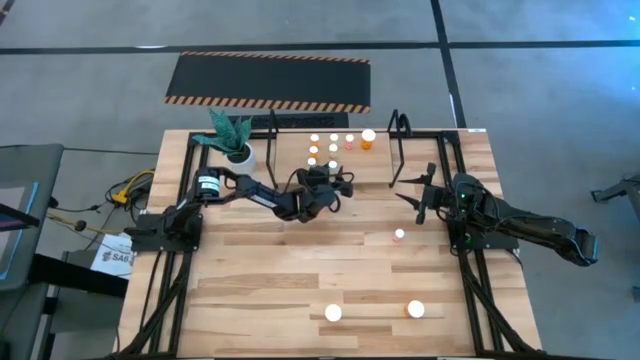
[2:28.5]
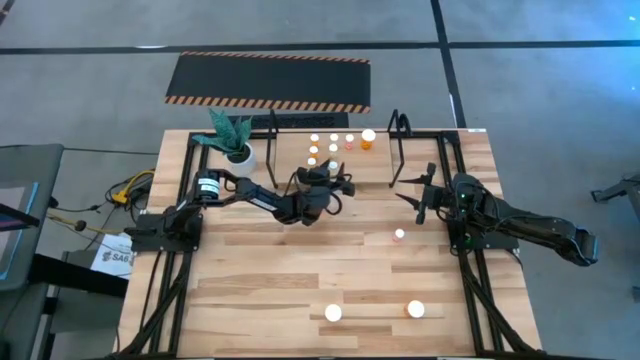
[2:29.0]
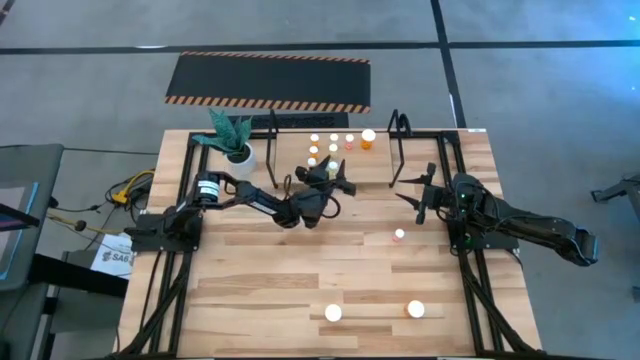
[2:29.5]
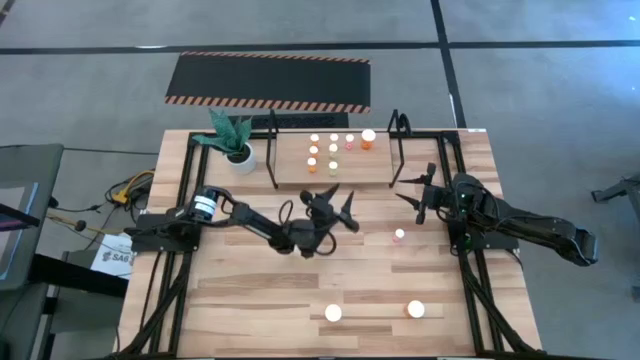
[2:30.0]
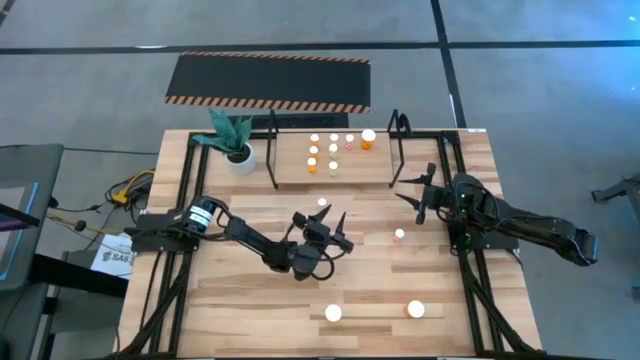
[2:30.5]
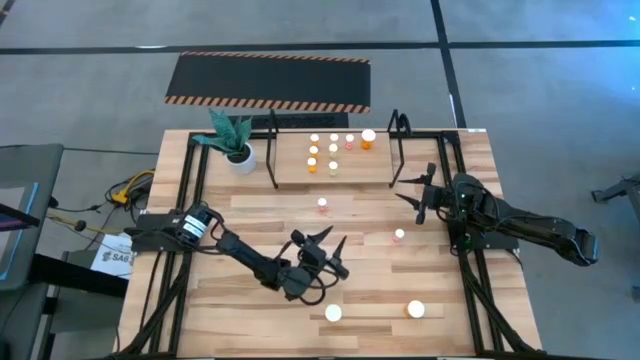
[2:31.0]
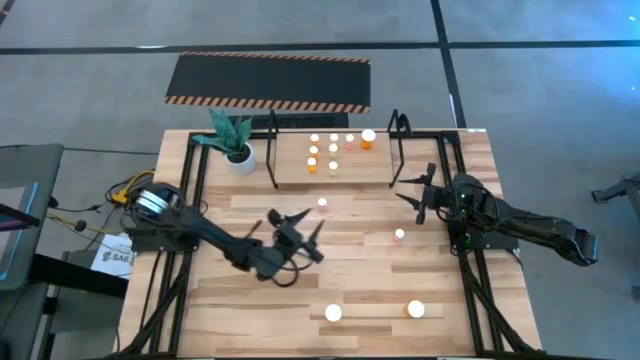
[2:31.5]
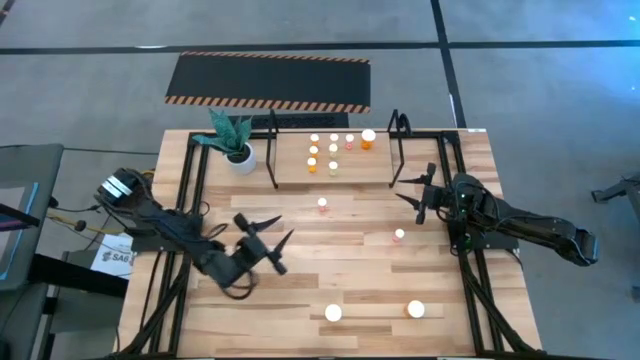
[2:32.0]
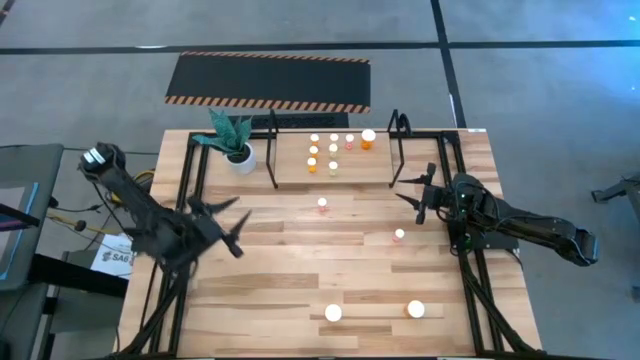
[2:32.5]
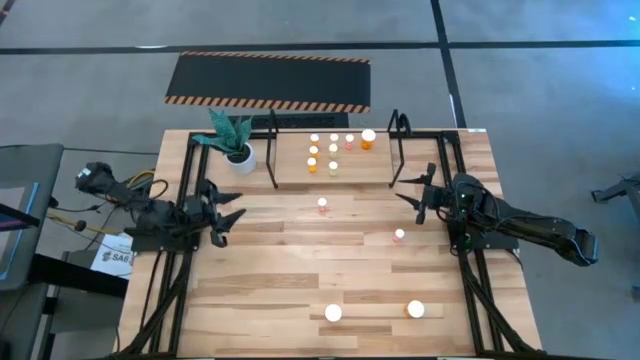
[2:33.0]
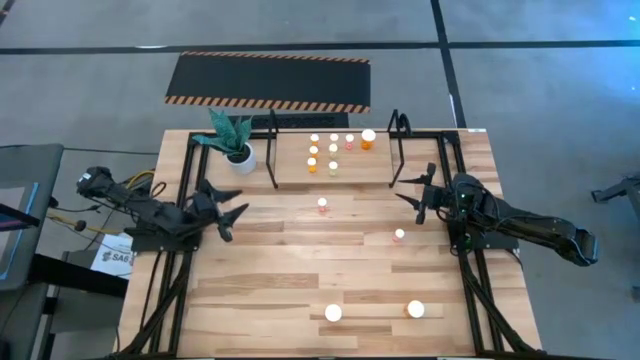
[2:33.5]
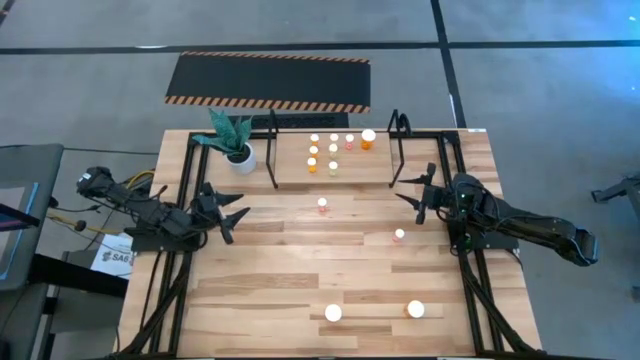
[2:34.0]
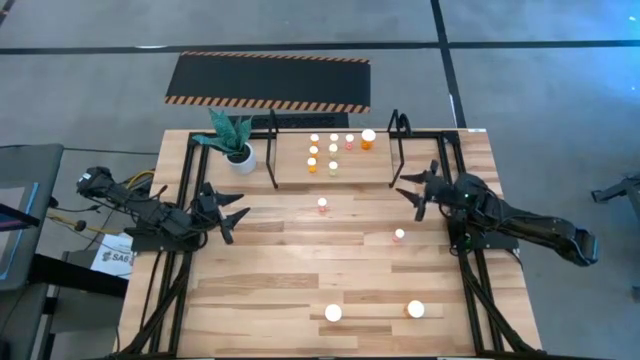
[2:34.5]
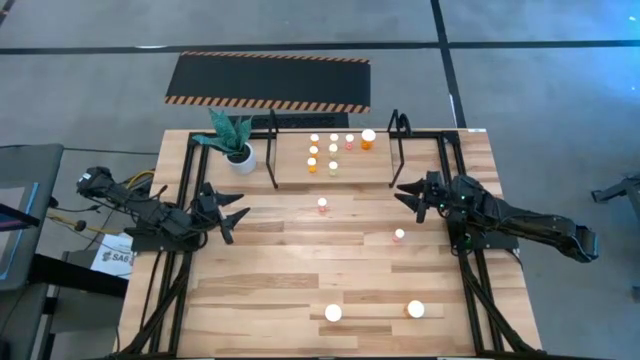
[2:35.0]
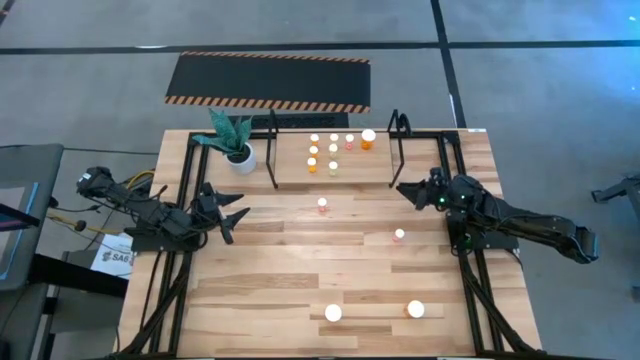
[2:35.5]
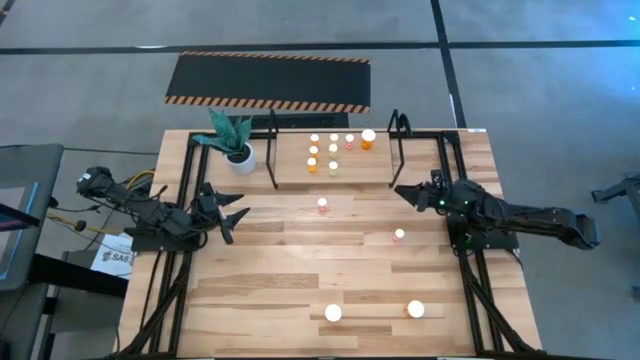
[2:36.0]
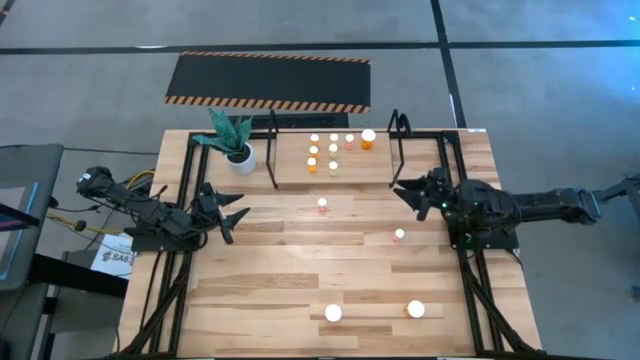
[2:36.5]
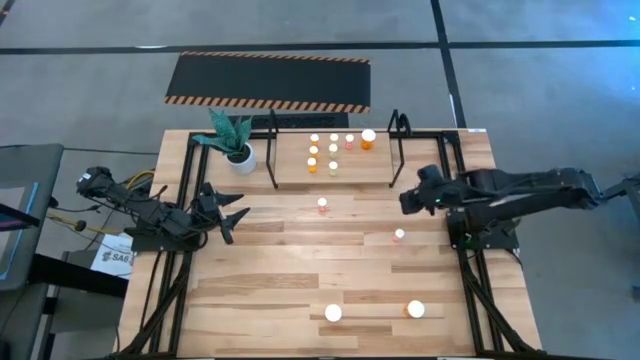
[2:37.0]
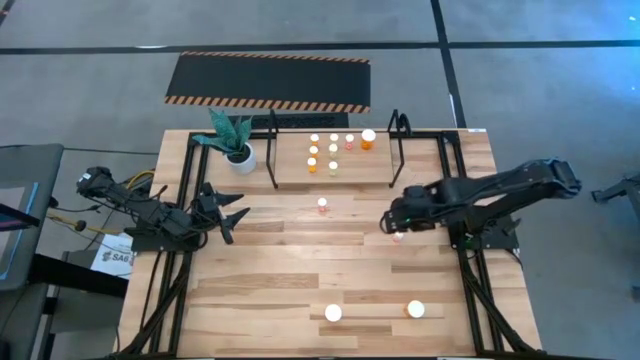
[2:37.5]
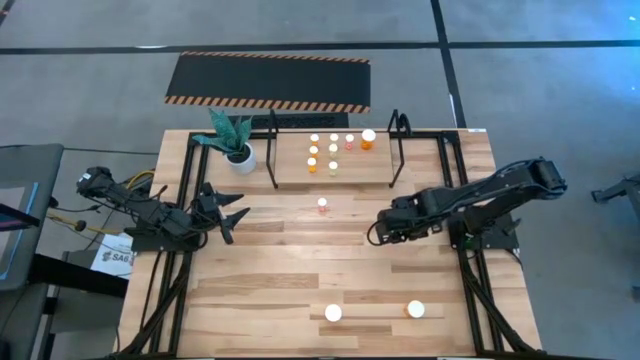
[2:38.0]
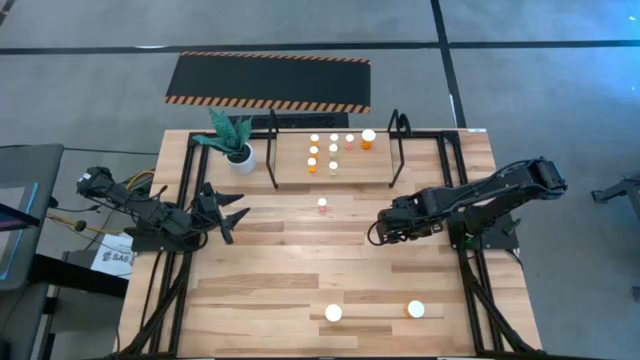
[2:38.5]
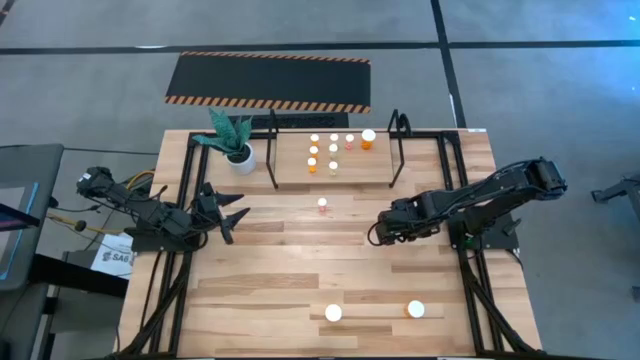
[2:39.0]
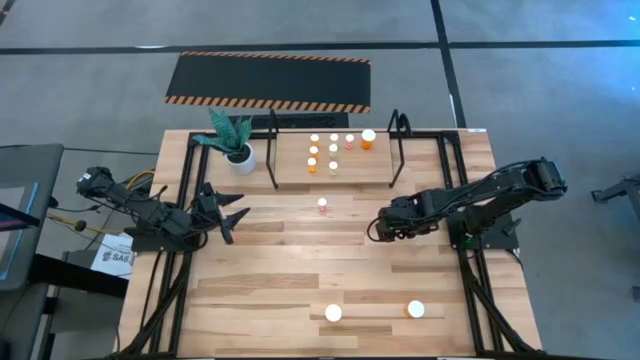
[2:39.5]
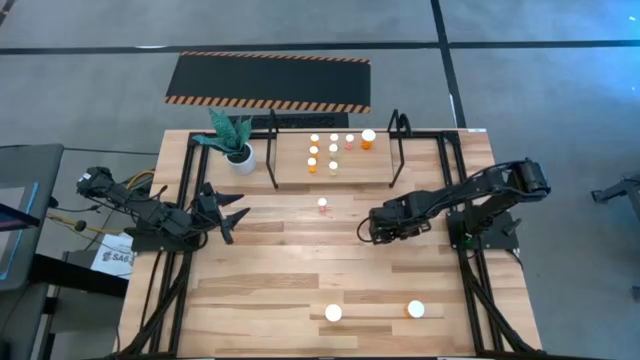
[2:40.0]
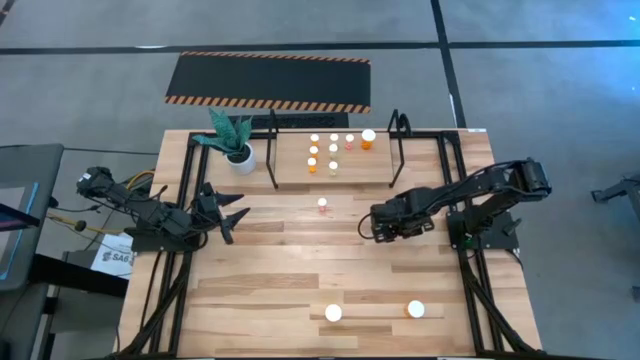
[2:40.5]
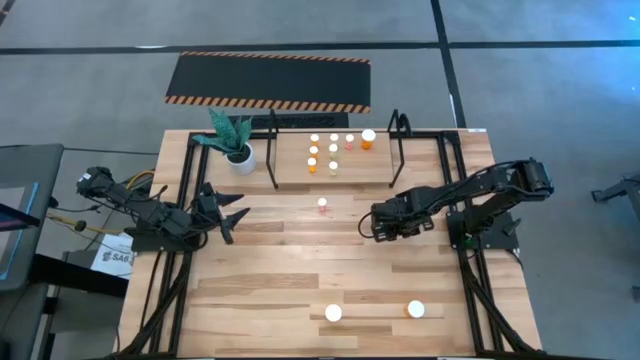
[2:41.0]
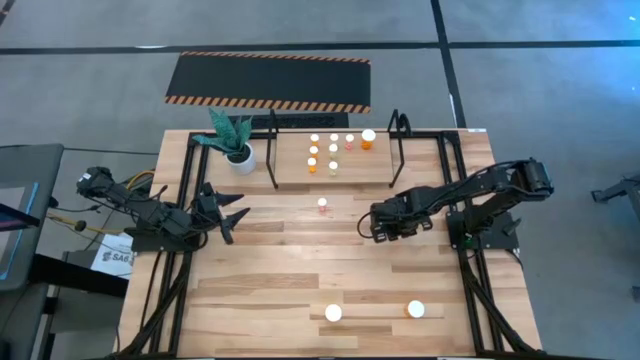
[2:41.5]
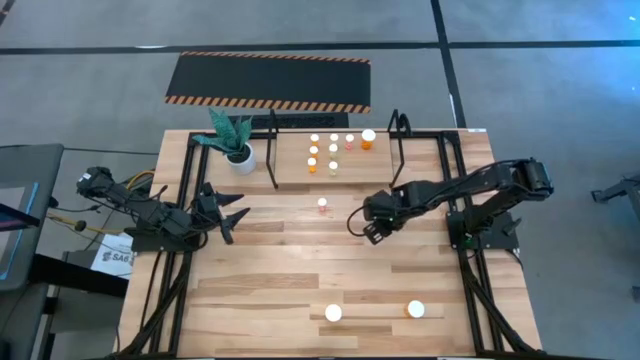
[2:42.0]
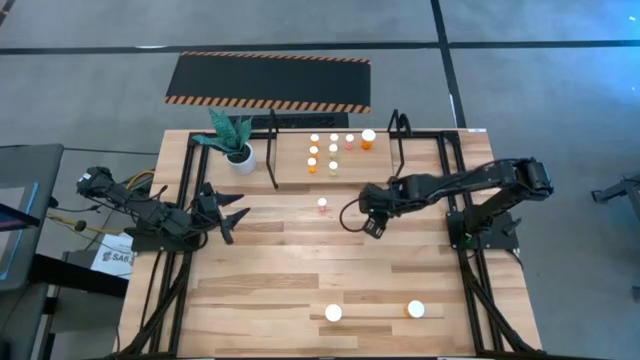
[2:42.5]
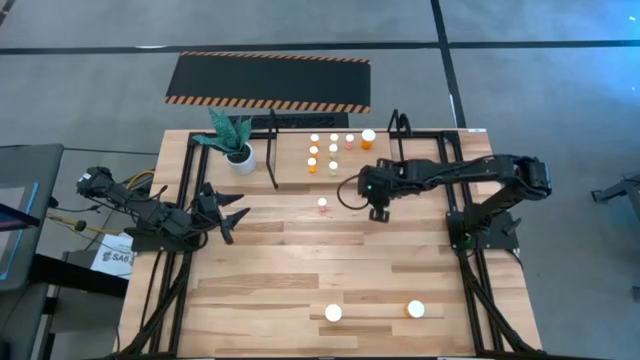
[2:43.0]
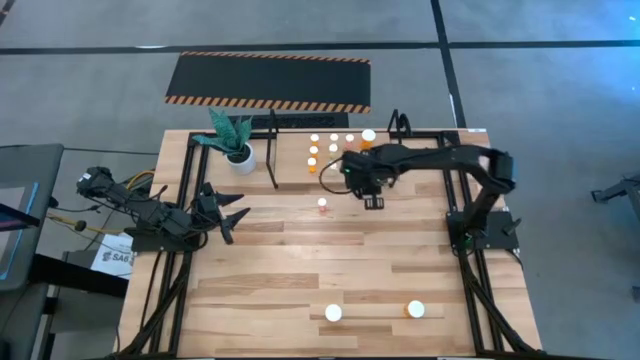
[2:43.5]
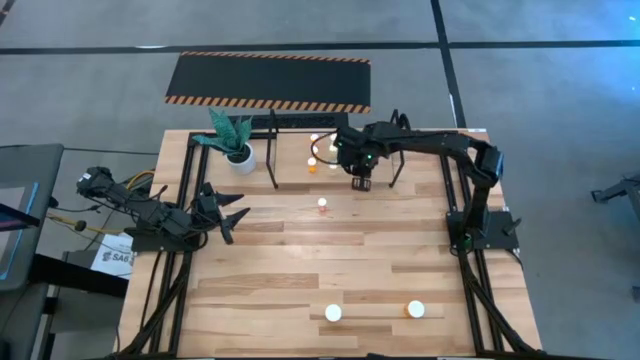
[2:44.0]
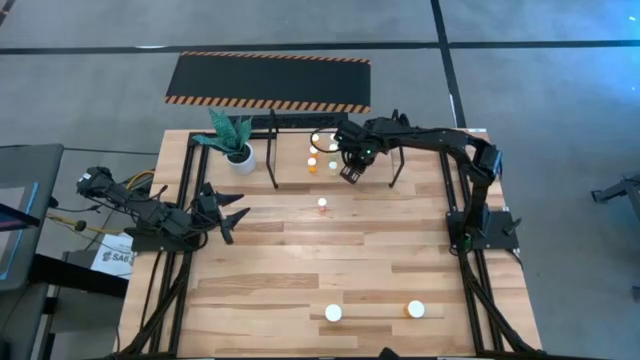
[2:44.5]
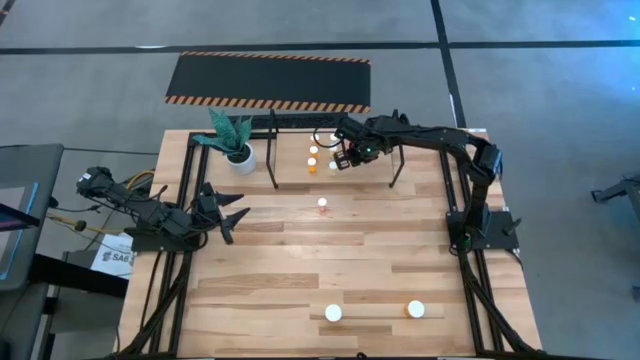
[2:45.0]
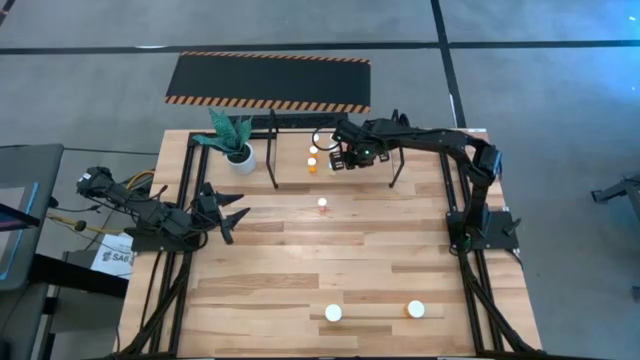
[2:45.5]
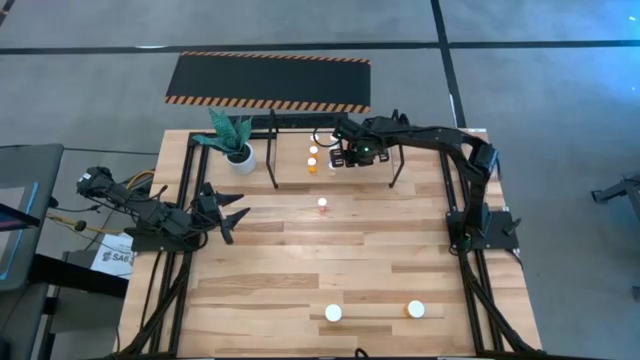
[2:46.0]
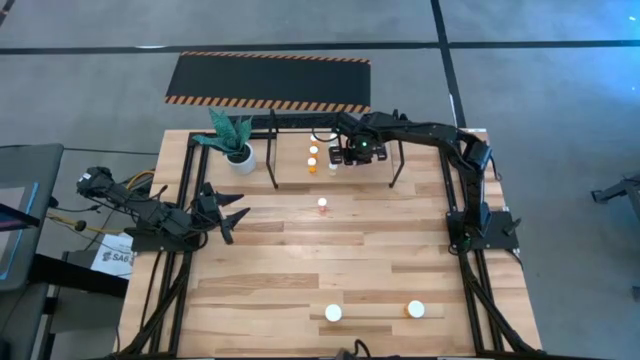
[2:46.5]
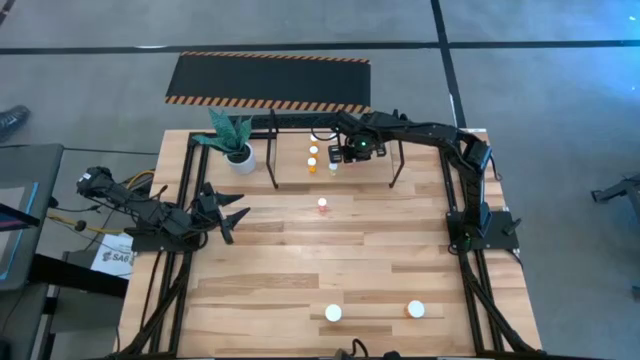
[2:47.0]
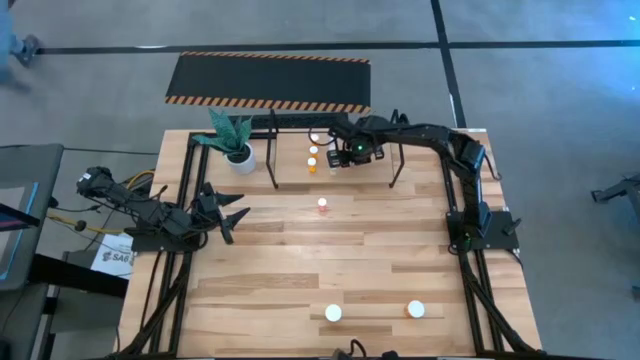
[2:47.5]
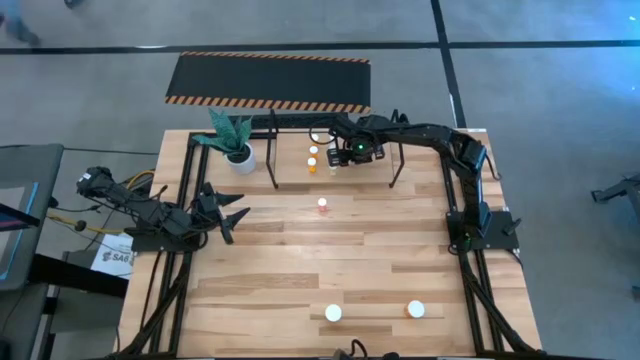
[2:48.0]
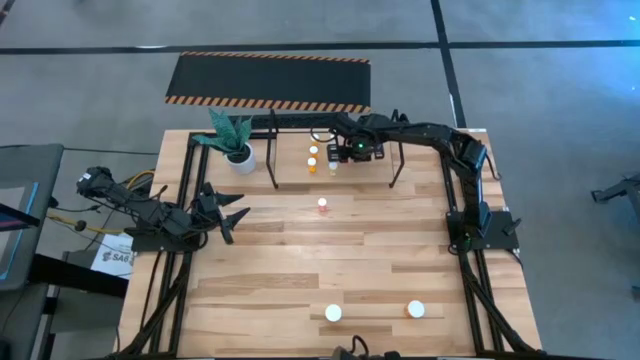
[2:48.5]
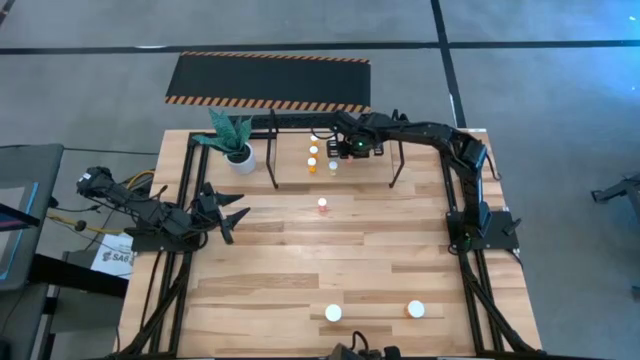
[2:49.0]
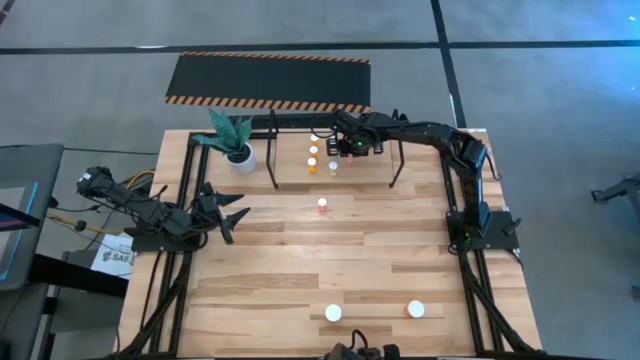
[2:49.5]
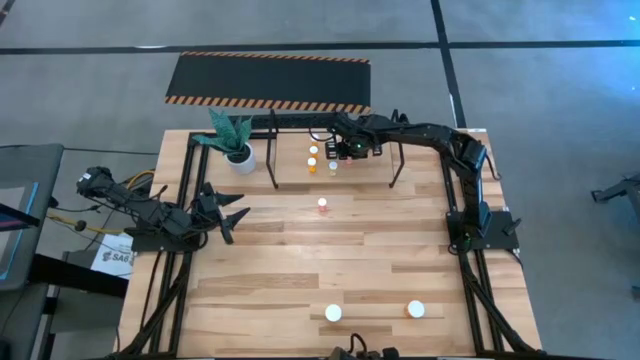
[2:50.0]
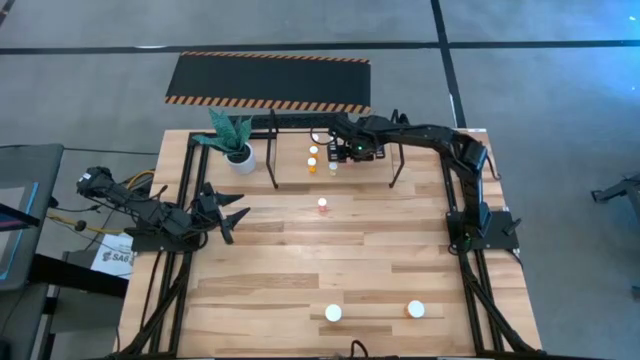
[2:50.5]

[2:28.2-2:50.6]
Task: Pick and place medicine bottles onto shelf by color
Put the right small pink pill bottle aligned with the other pink pill bottles on the shelf
